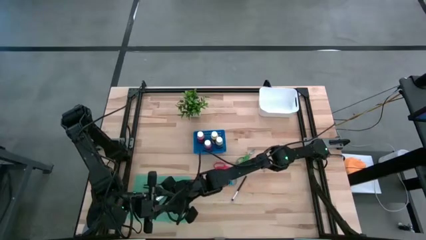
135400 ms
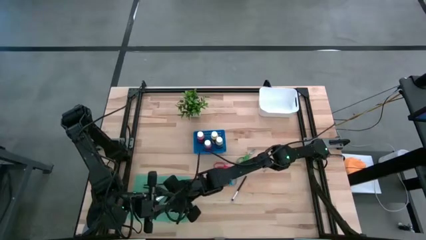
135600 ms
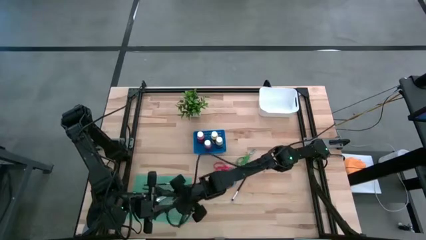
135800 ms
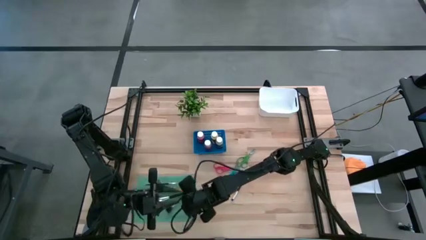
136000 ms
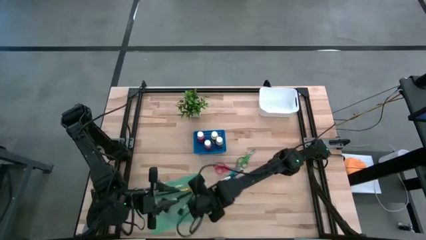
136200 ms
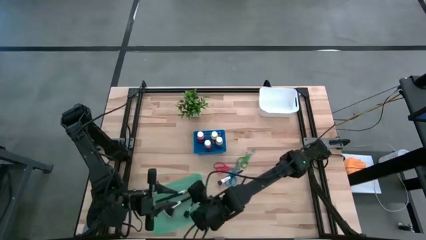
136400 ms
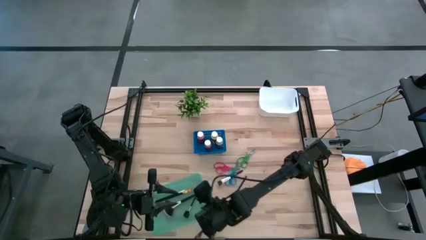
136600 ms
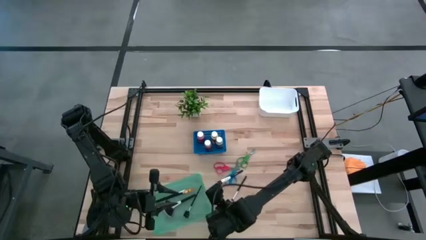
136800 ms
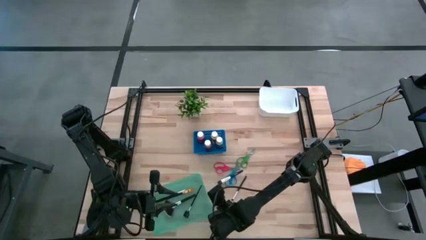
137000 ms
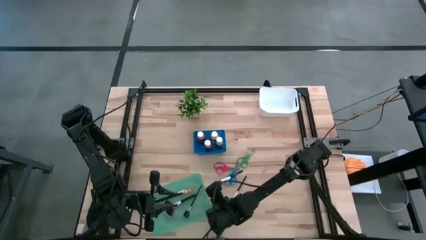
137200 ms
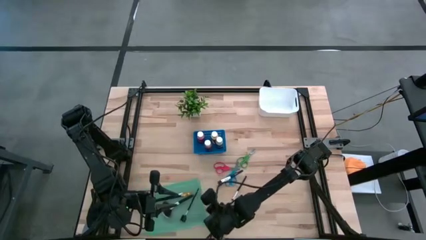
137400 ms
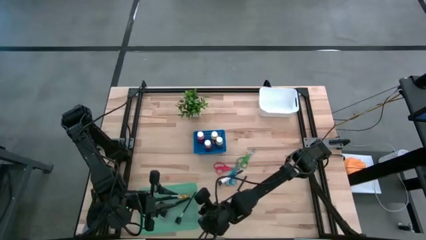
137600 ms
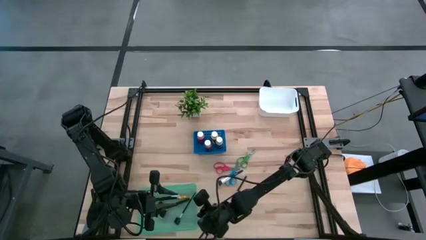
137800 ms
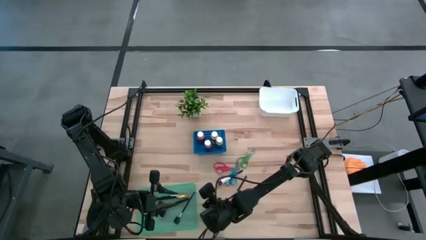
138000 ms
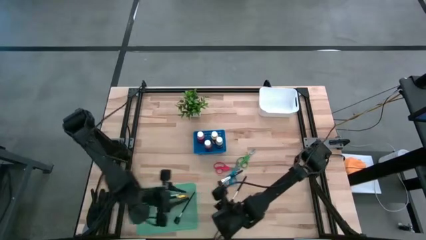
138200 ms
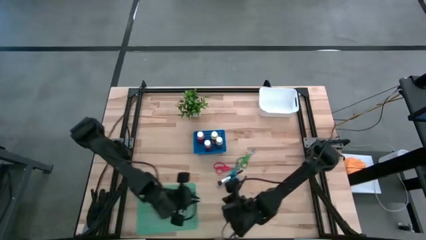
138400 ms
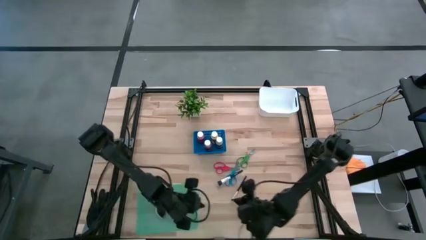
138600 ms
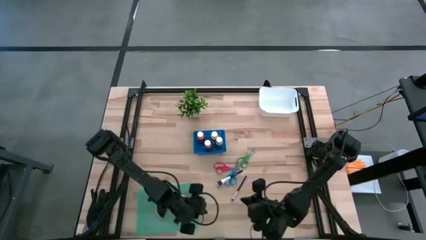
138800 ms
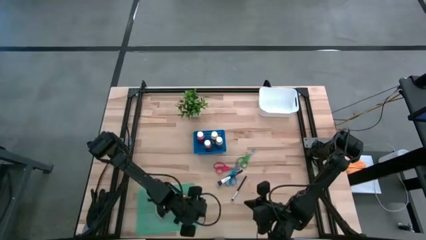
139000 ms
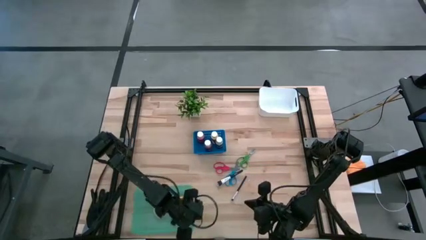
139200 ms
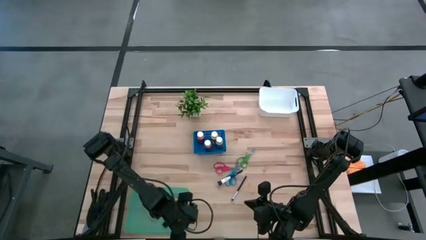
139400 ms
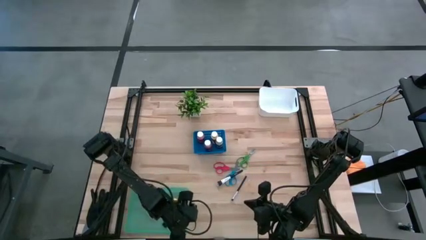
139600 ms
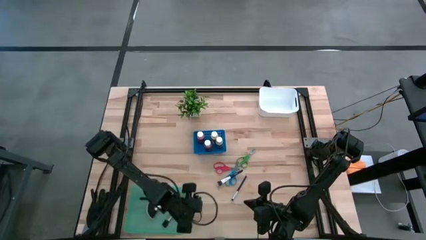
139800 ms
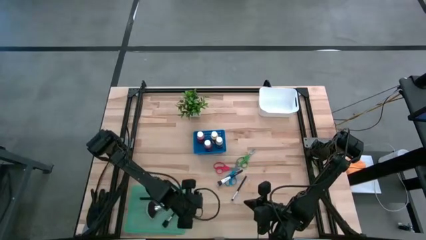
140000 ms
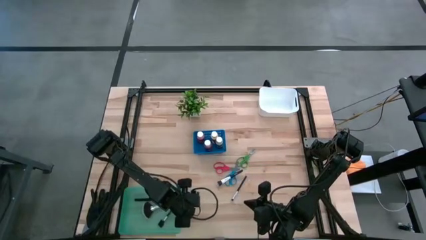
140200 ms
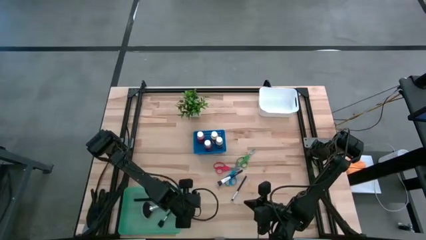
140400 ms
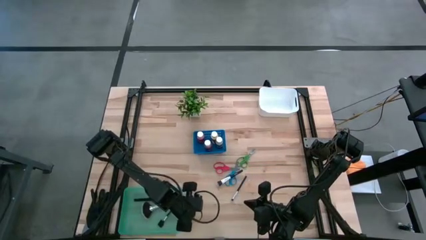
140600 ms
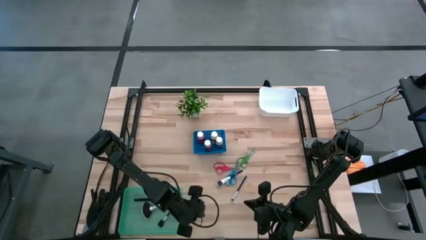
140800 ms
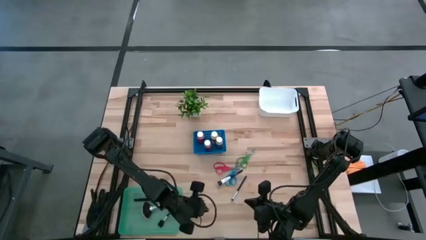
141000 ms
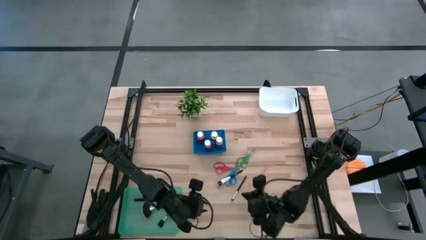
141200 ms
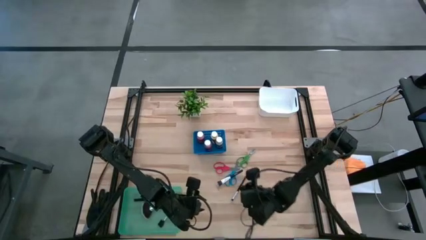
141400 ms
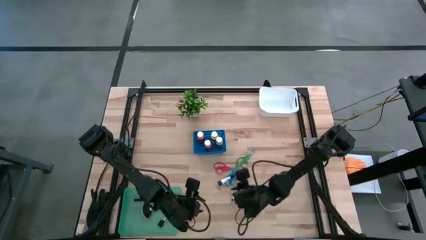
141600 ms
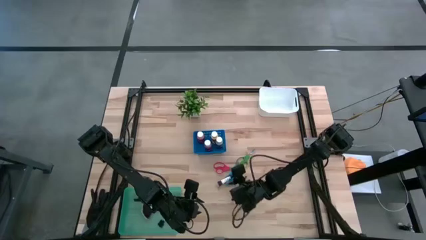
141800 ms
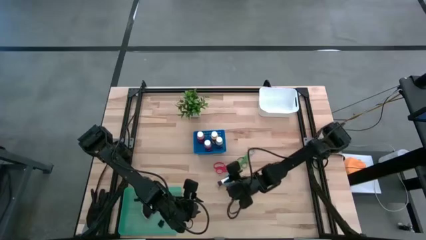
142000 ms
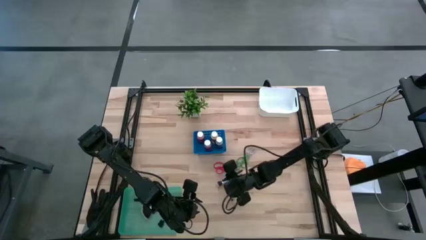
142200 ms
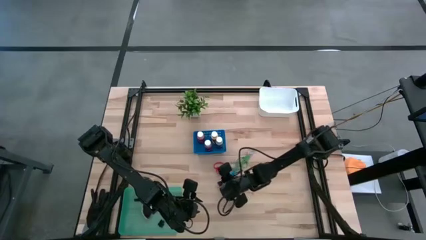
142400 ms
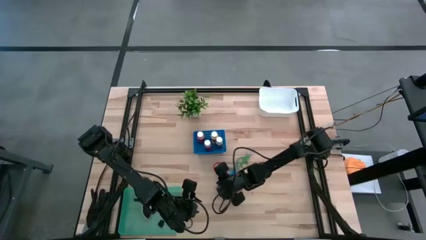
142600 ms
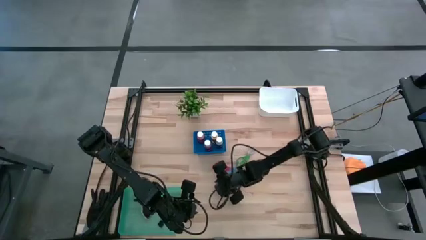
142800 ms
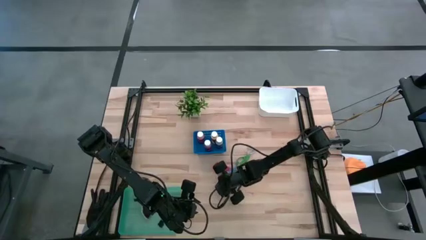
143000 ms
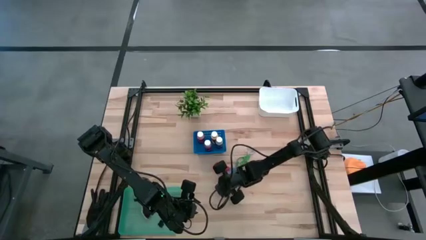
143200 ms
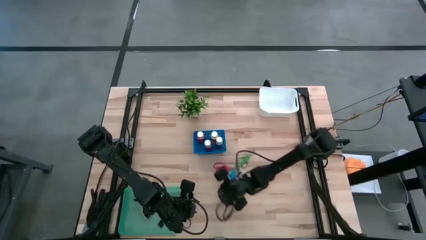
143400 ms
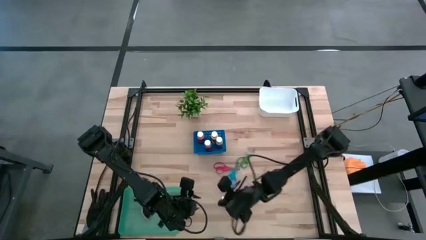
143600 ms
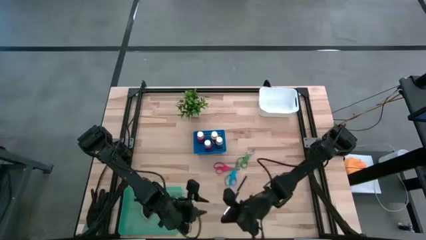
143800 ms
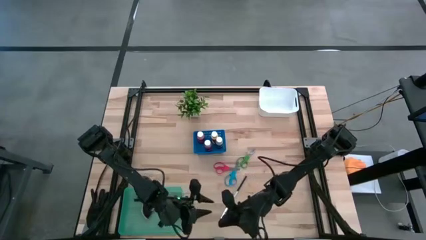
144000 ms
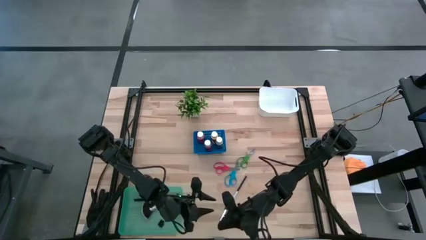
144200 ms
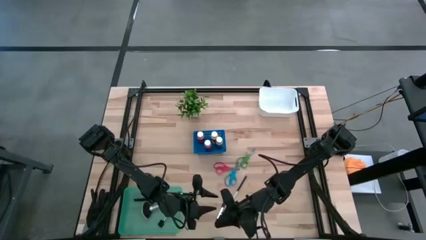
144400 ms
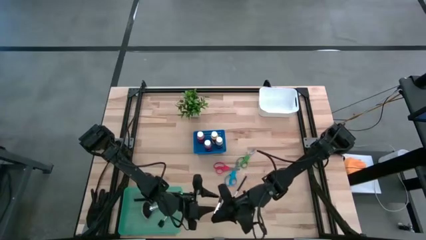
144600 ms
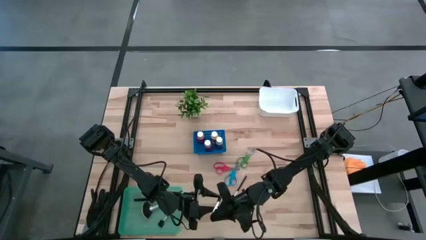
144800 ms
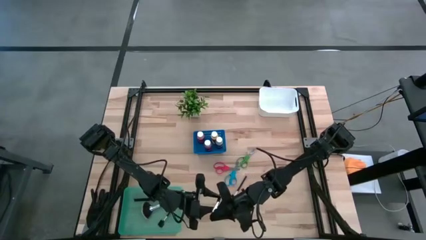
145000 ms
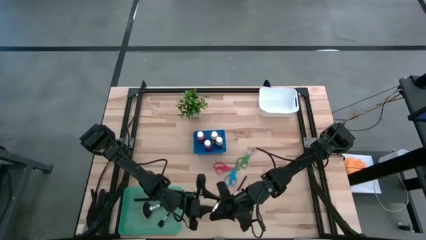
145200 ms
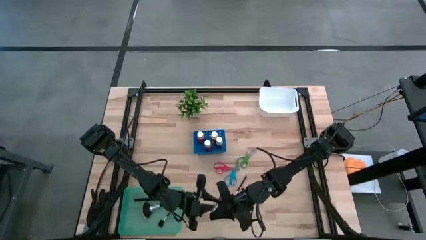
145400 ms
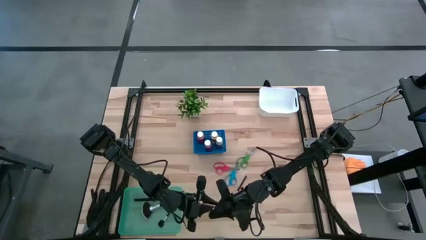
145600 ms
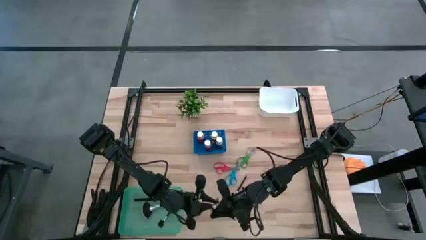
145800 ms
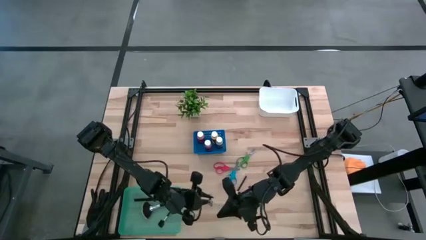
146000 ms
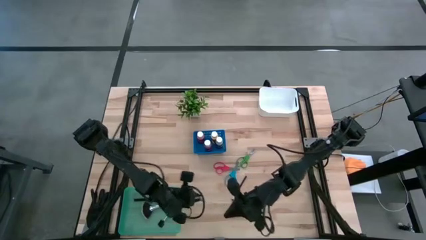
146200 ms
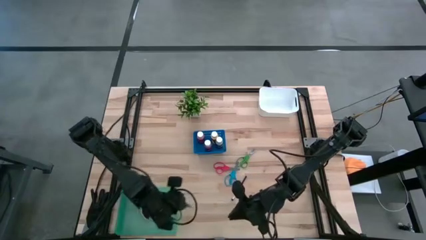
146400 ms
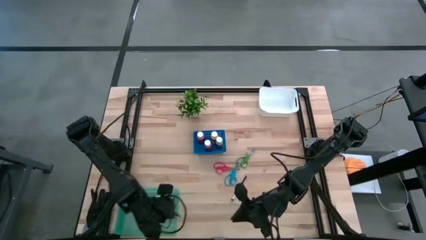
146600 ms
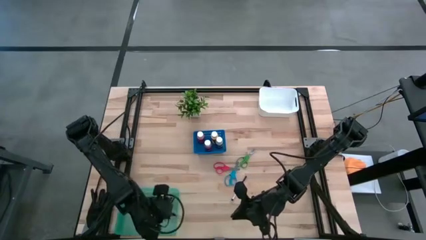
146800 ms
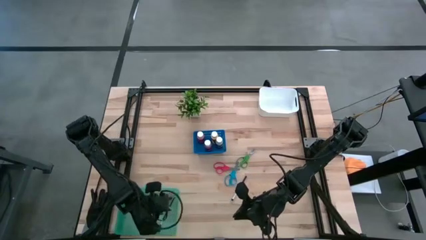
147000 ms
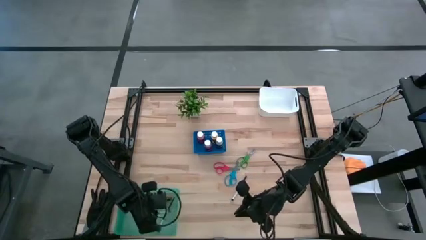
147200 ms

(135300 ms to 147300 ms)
Task: Pick & Place Paint Supplies
Put the blush brush into the green bin

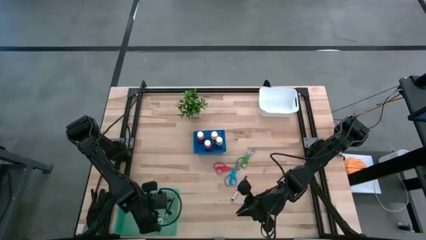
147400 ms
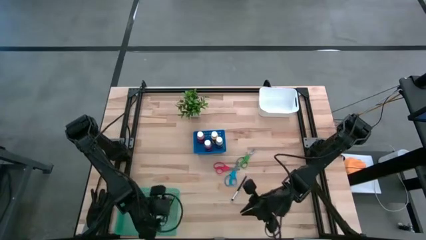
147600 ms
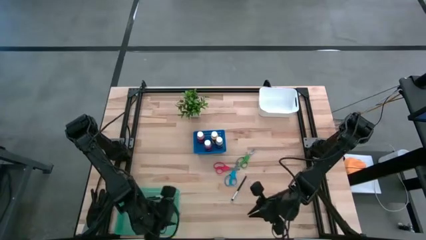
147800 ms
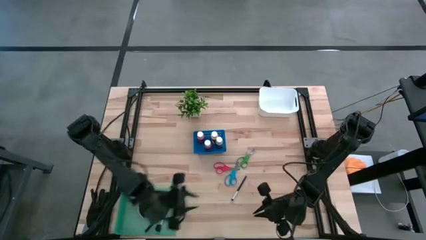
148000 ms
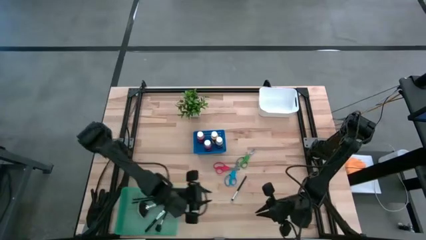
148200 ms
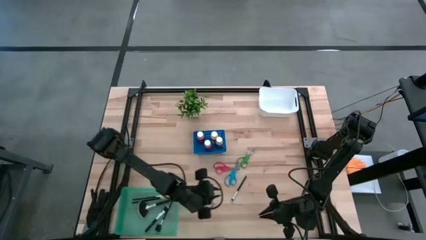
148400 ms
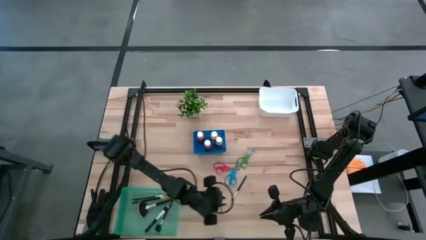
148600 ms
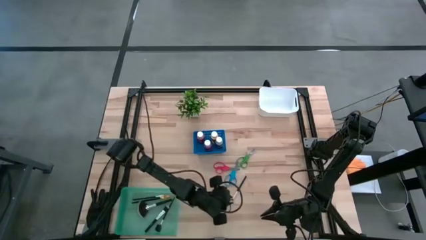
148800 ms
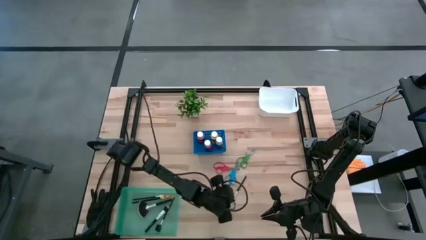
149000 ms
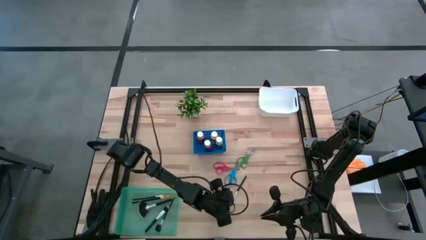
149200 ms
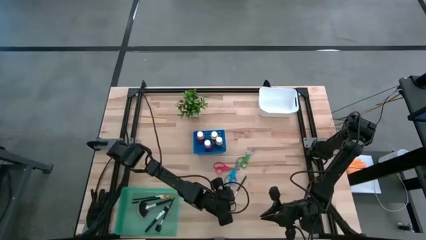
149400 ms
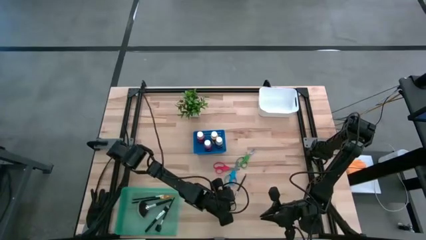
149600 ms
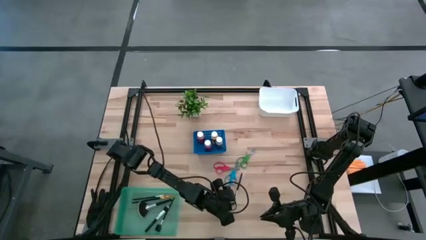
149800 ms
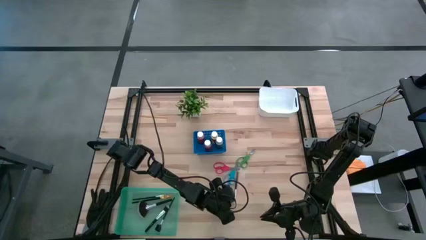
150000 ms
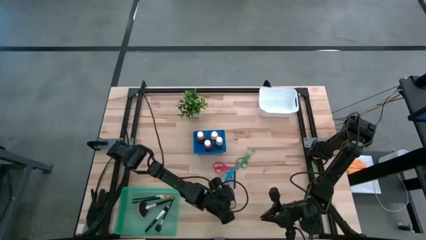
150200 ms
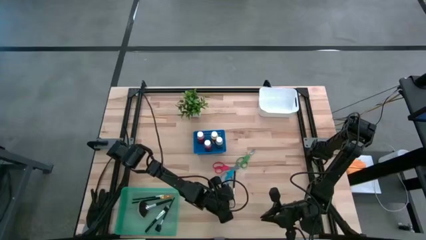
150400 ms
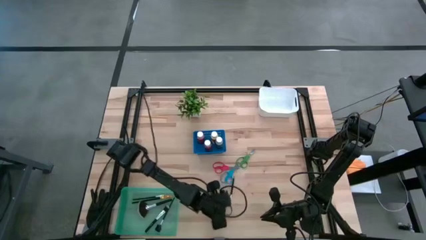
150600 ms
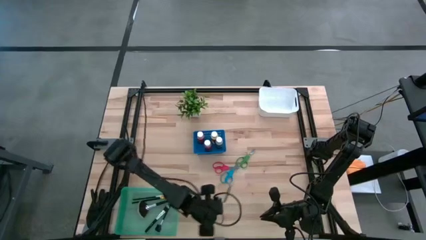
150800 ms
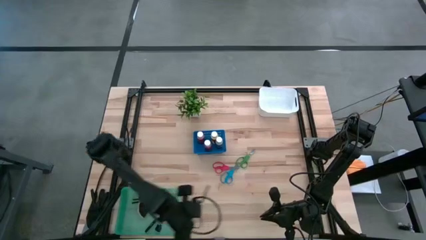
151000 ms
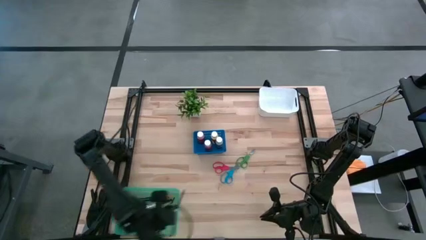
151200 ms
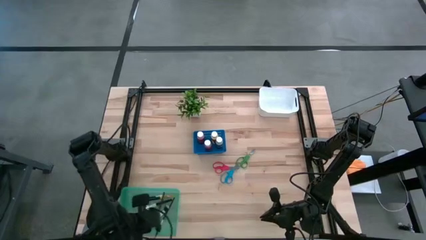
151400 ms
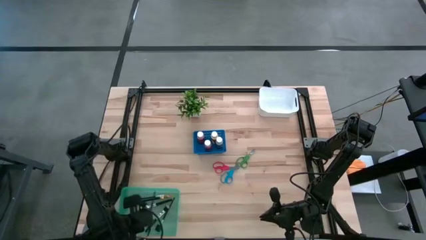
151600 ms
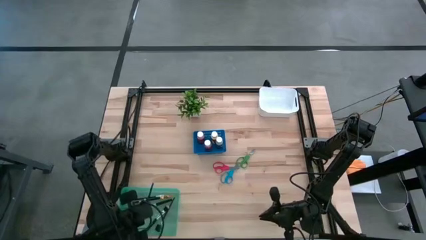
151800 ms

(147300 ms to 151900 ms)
Put the eyeshadow brush into the green bin
